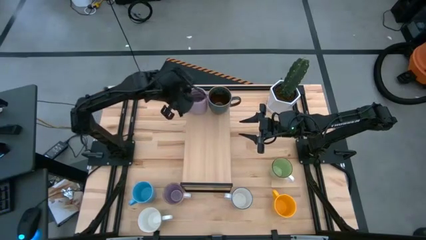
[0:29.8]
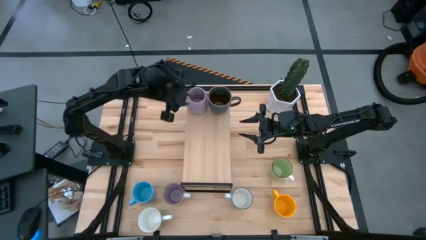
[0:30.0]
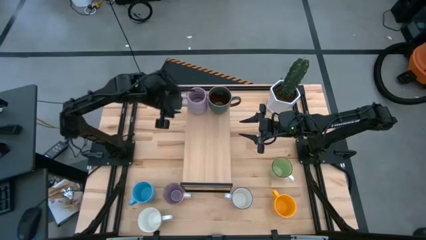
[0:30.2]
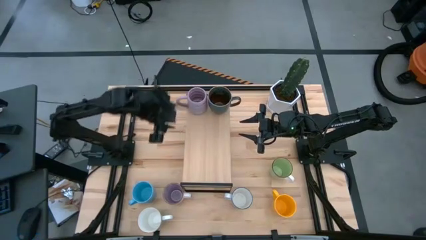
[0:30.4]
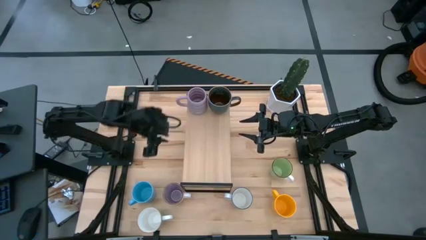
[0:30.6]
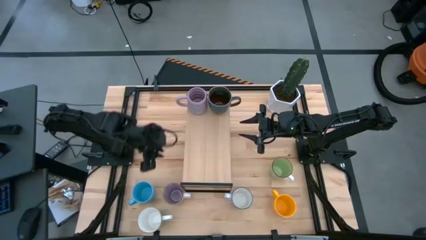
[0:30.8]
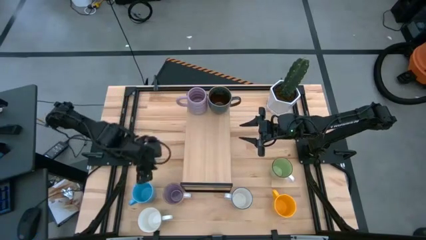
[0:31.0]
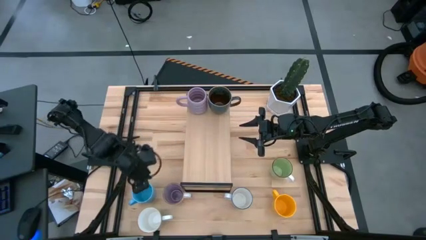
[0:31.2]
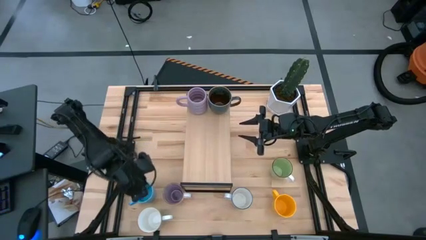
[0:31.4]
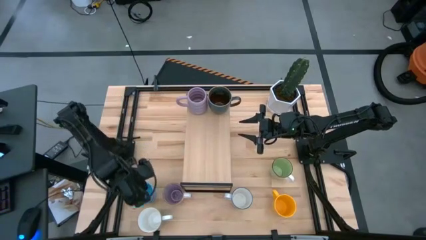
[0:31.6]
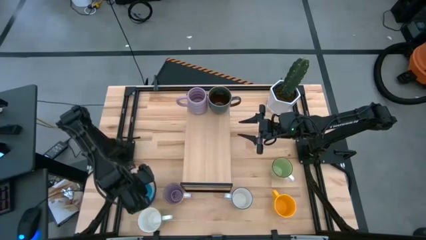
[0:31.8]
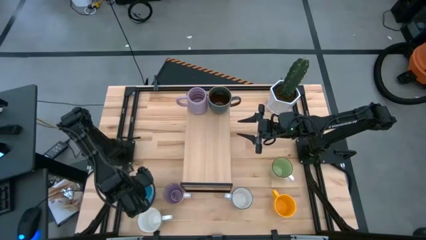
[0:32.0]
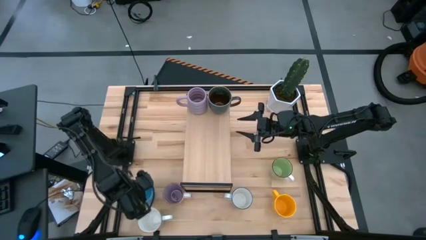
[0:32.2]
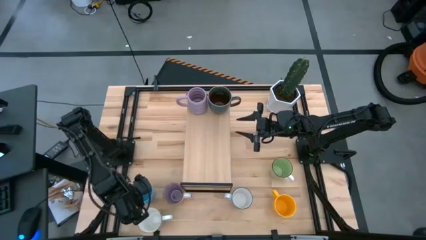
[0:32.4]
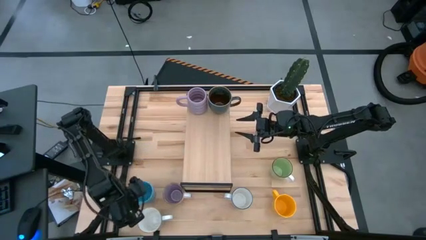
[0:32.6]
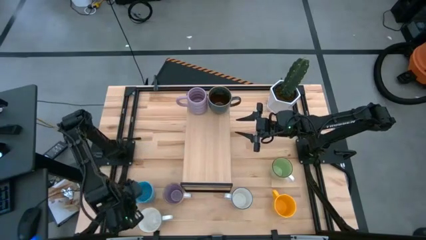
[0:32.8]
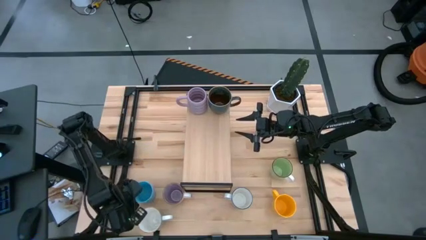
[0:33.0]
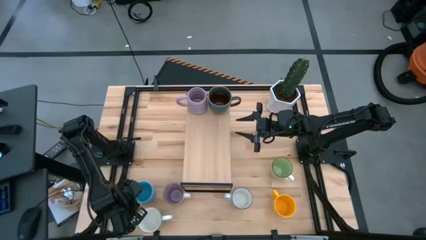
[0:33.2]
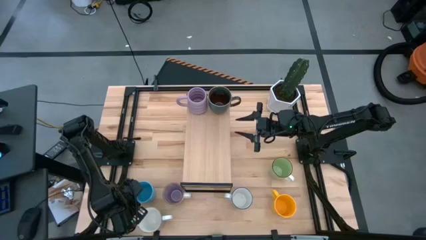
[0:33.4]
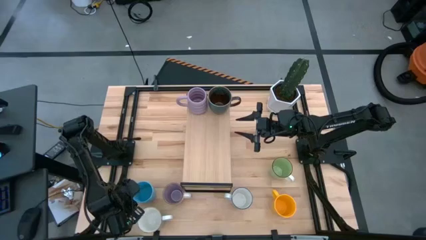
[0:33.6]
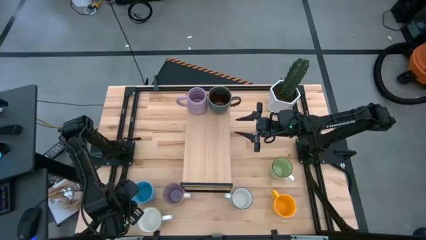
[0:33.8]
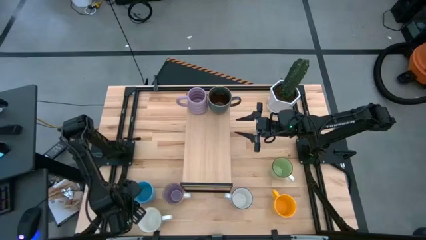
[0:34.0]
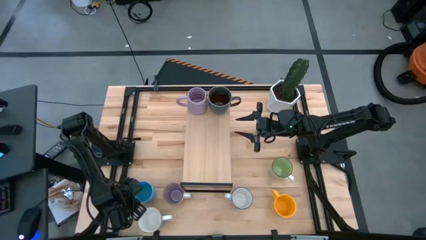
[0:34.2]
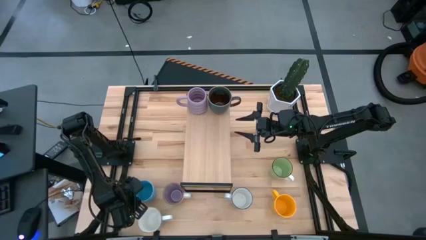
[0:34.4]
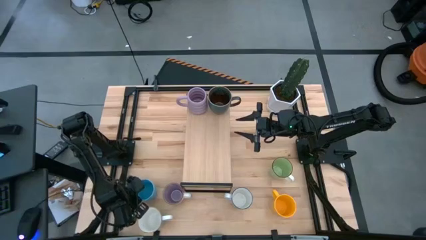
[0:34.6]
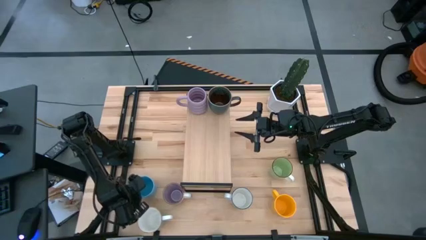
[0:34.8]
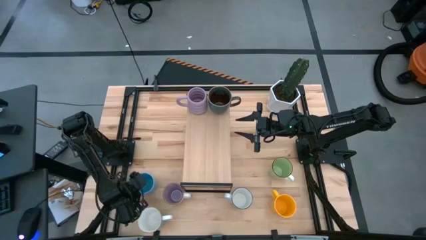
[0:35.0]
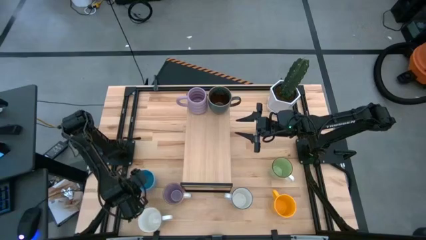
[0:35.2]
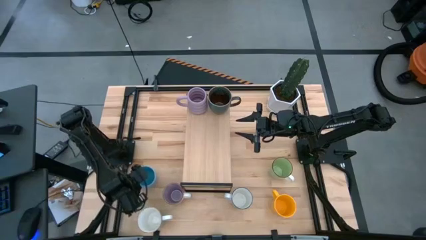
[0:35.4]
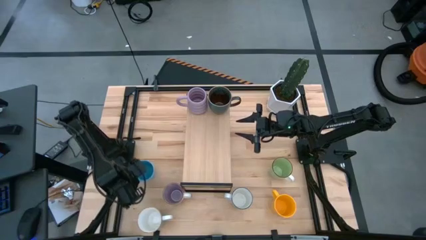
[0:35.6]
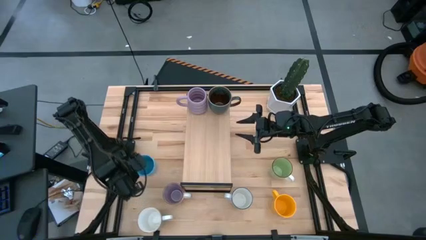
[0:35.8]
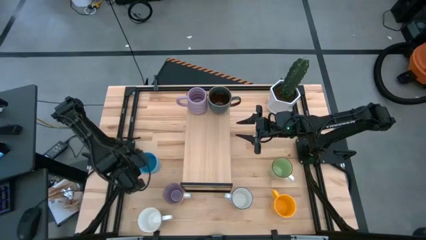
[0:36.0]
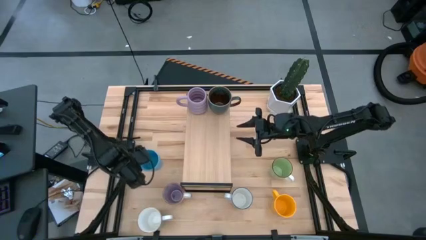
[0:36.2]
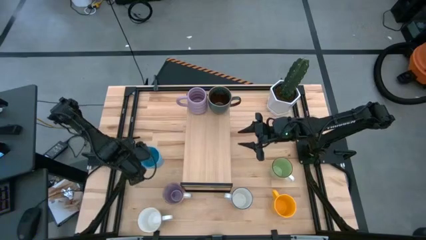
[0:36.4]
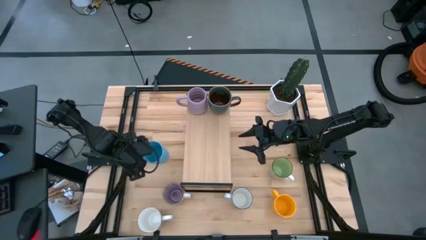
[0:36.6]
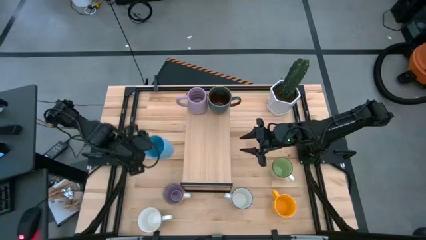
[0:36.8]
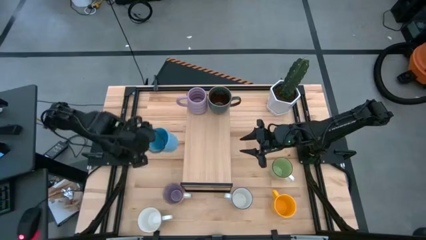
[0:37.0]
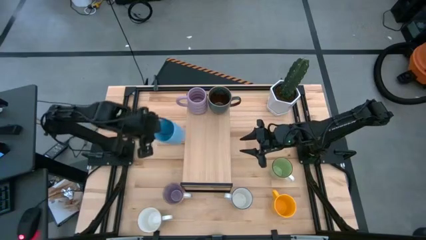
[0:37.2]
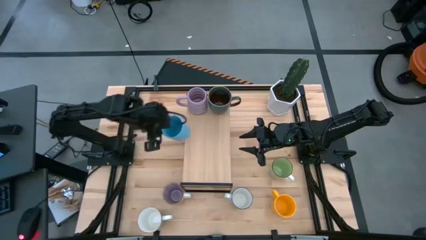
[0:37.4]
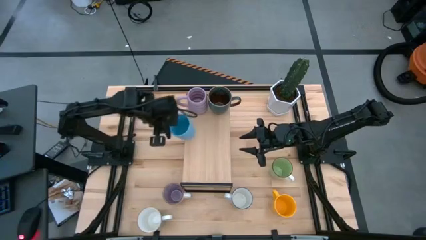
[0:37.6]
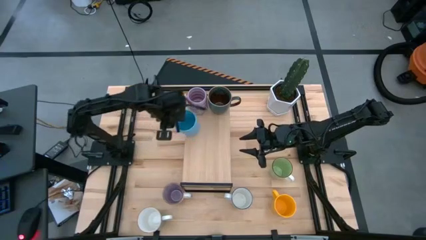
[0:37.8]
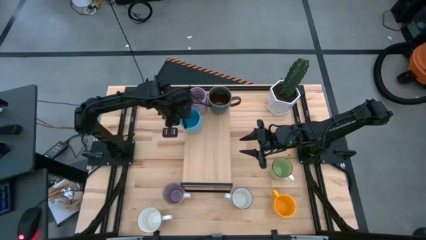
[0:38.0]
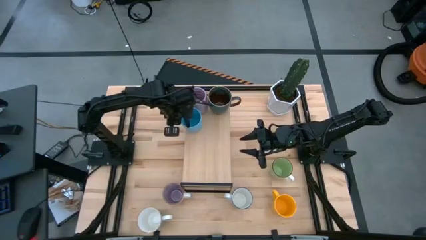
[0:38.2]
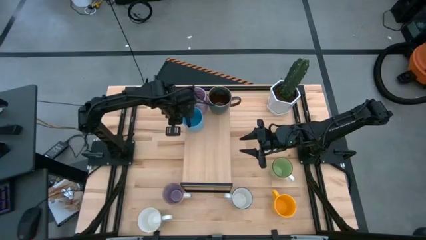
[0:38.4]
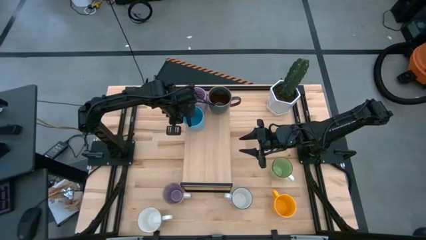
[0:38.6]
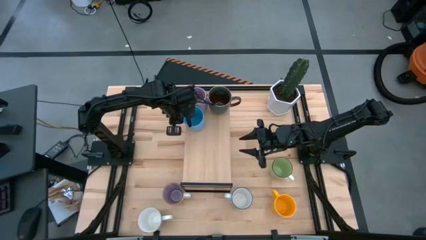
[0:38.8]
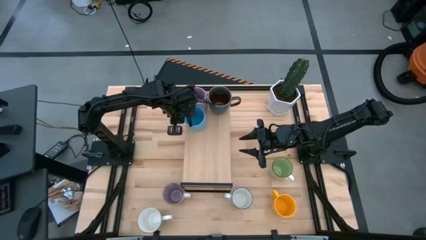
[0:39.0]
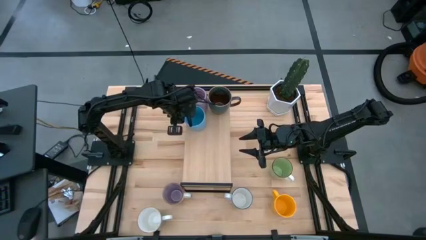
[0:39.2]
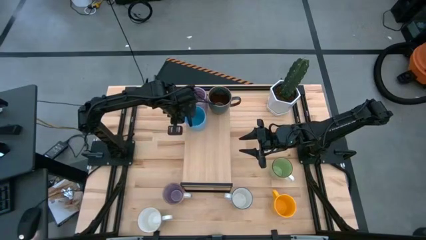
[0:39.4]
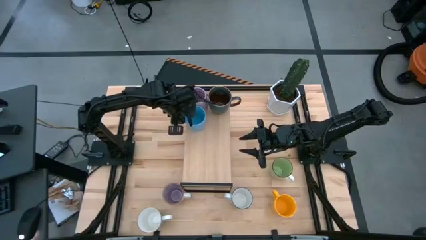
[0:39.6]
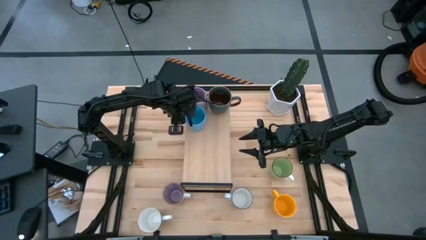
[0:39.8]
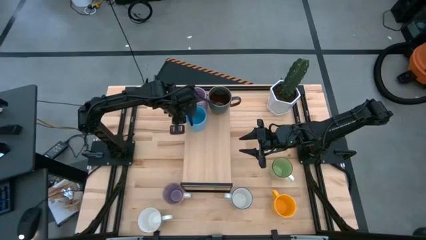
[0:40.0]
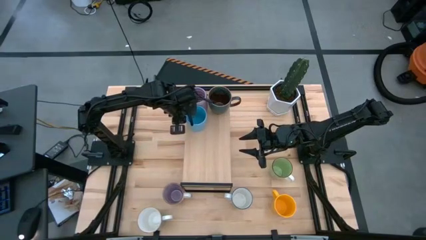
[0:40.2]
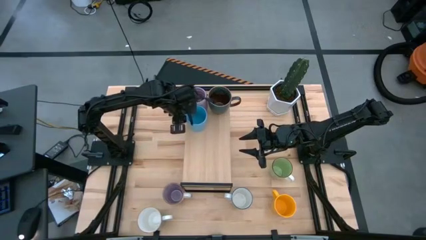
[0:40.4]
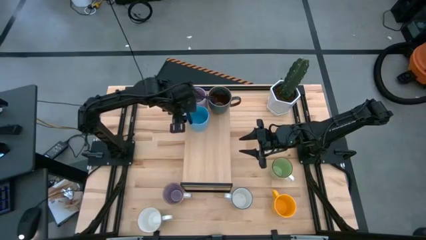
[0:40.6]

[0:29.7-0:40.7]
Task: Place coffee mugs
Put the blue mug on the shelf

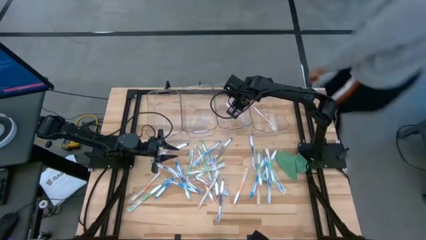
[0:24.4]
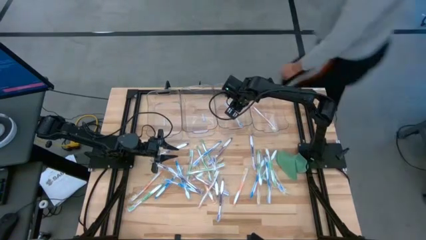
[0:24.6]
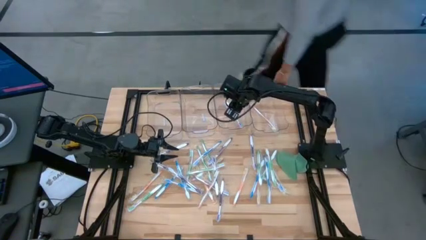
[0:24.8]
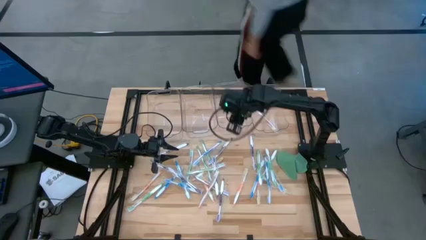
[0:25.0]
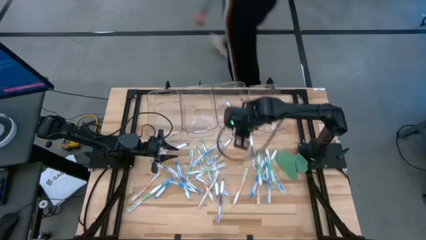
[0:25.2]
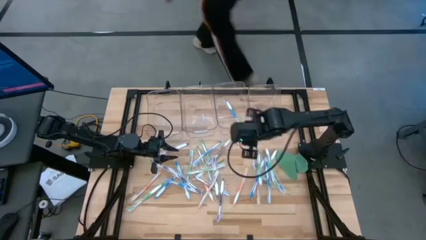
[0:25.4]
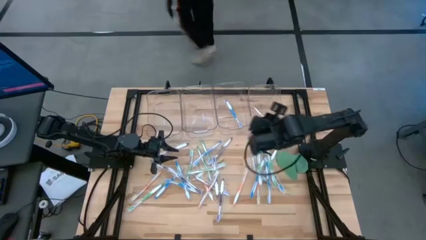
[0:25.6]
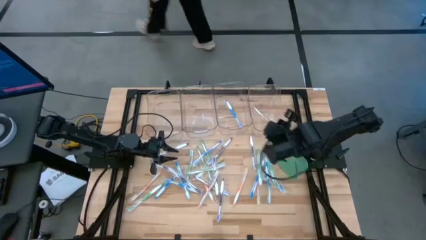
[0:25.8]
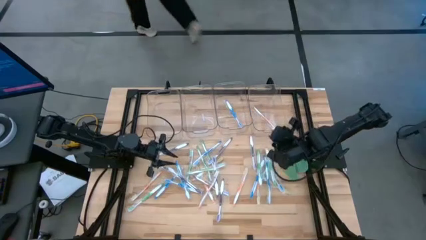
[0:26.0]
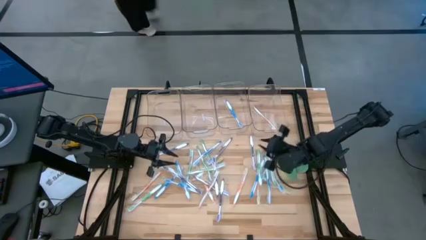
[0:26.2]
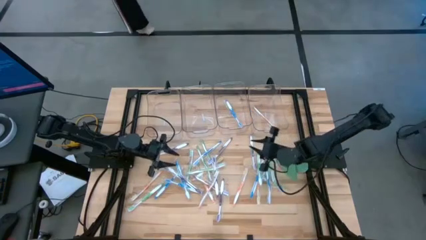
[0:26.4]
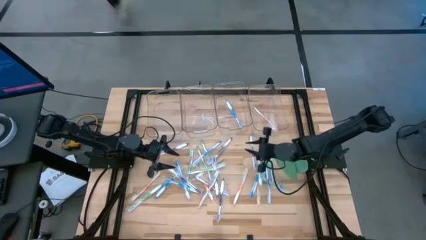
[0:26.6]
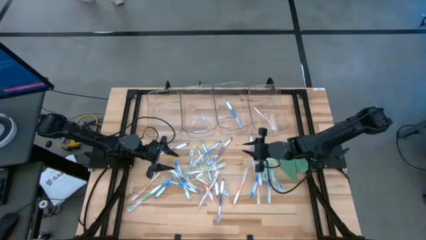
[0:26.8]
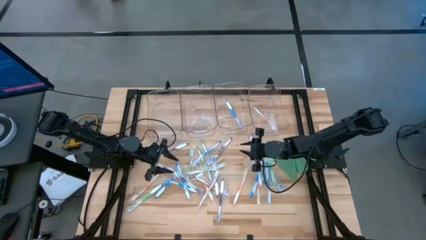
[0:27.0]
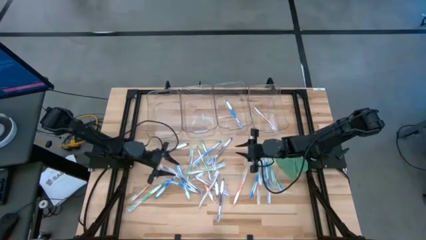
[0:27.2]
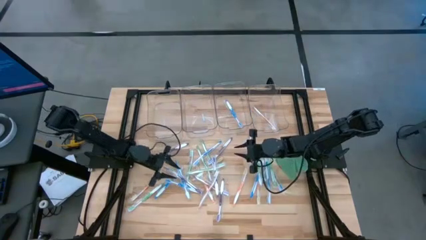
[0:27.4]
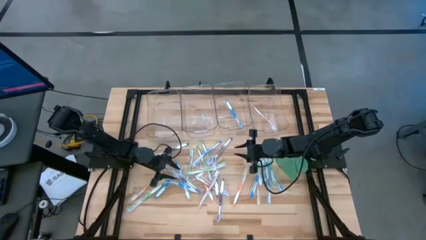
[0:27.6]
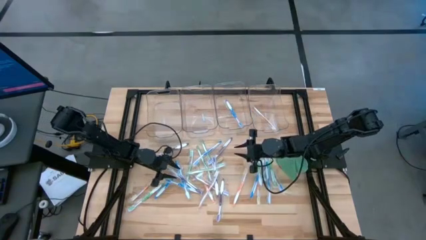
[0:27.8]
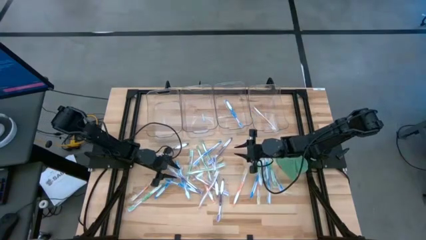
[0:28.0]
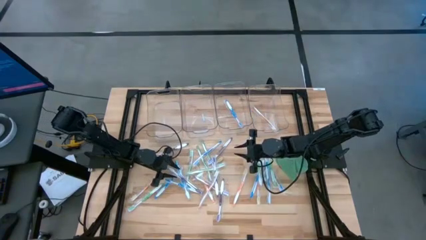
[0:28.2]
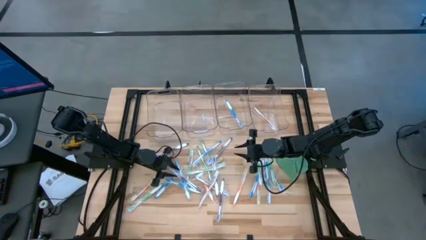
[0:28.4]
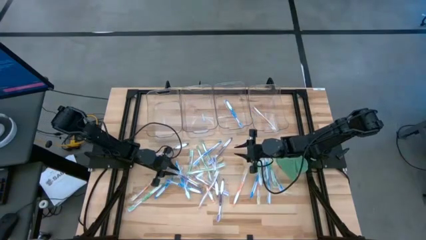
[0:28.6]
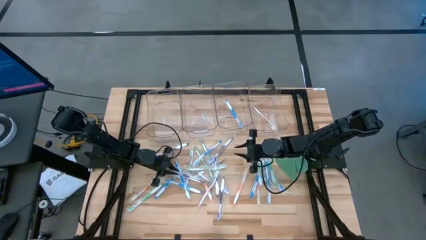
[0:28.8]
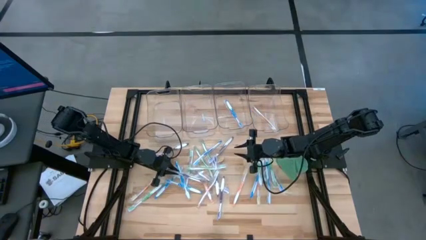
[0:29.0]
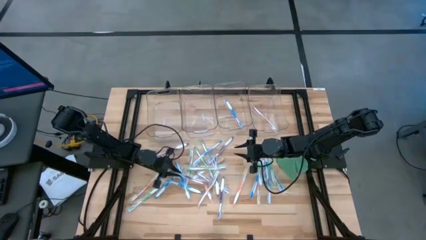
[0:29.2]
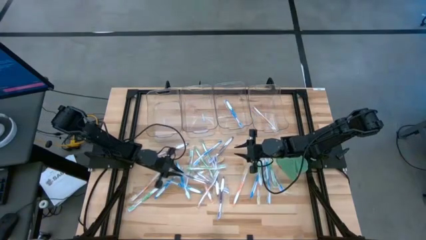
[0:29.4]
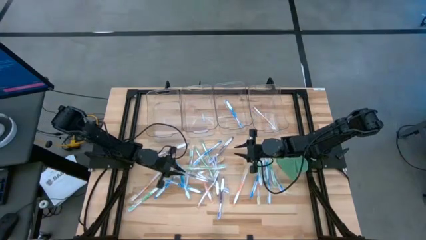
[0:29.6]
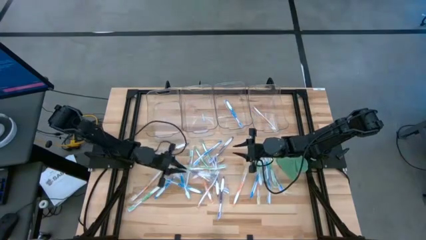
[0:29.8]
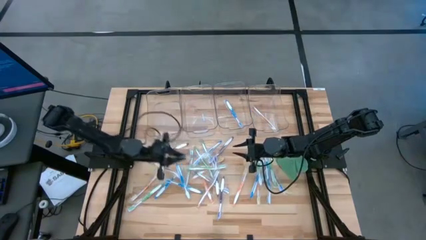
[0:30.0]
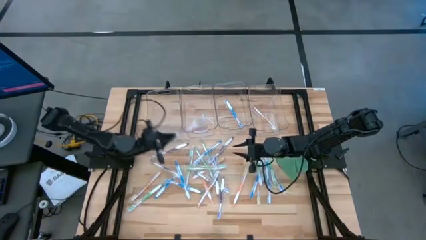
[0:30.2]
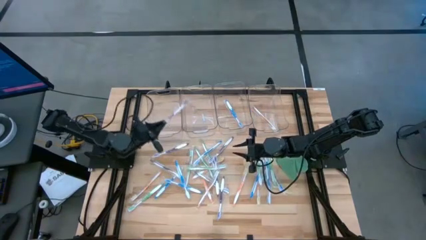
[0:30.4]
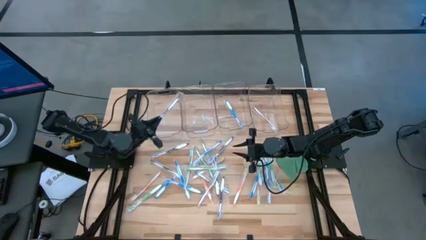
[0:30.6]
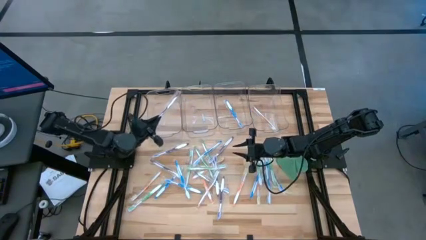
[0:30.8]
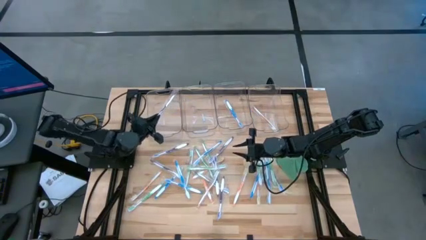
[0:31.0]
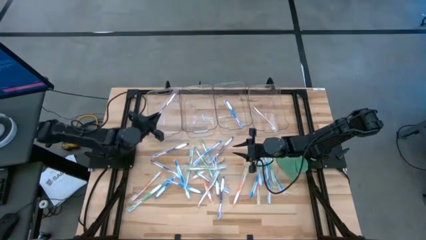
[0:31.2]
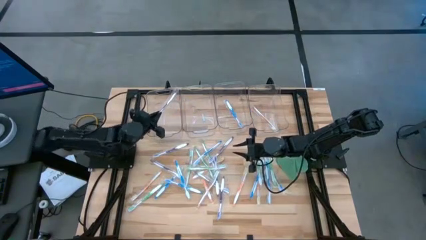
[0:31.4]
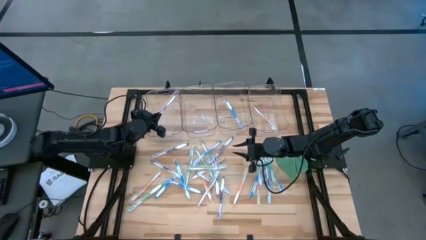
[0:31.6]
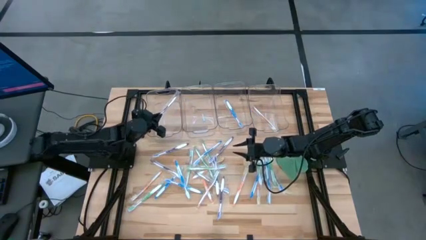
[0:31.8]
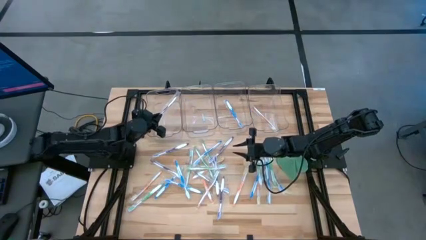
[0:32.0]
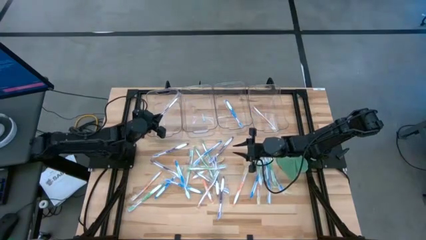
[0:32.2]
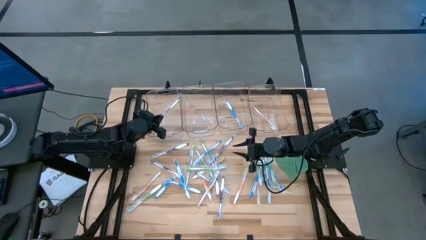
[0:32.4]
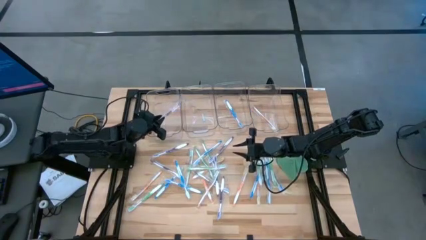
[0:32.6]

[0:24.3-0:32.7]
Task: Pick & Place Toothbrushes
Put the purple toothbrush into the left transparent bin
